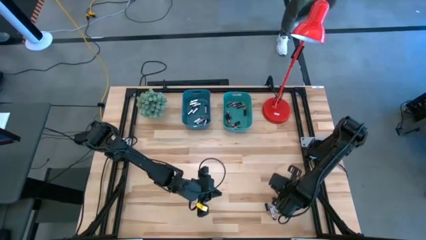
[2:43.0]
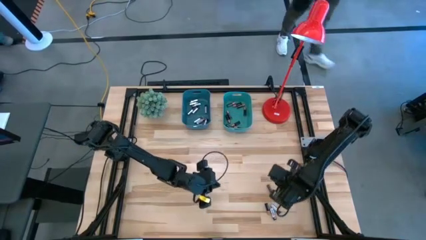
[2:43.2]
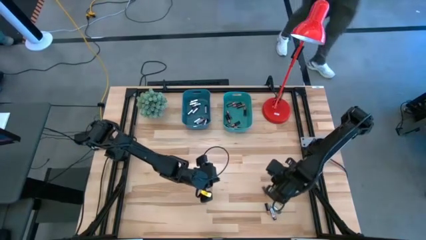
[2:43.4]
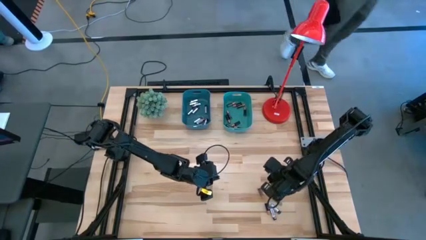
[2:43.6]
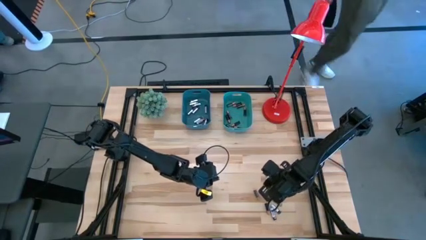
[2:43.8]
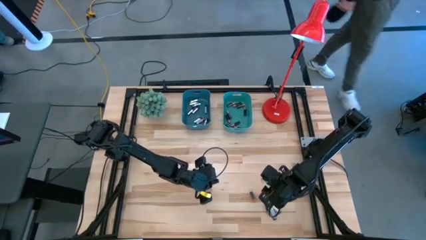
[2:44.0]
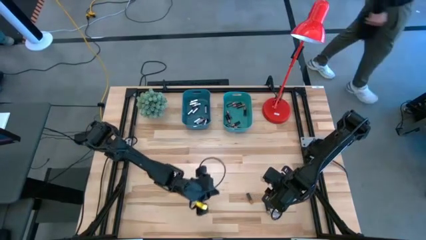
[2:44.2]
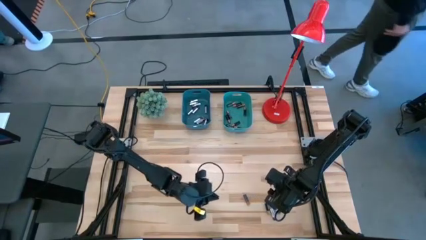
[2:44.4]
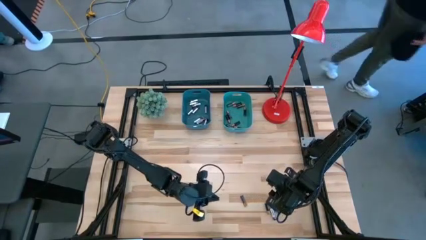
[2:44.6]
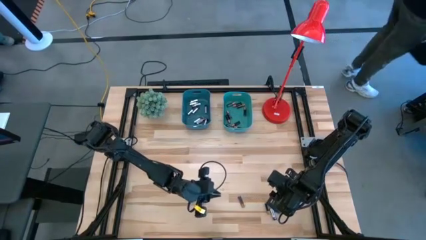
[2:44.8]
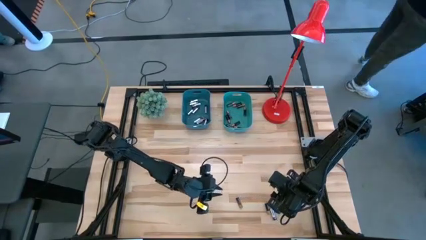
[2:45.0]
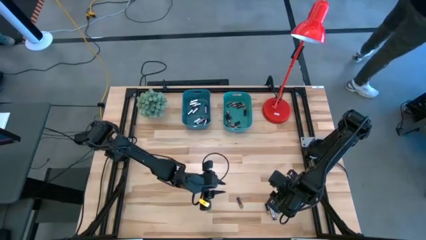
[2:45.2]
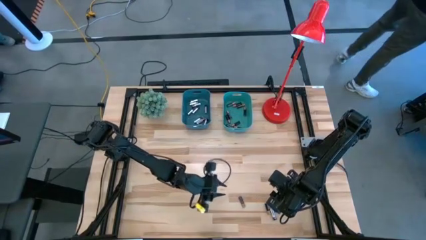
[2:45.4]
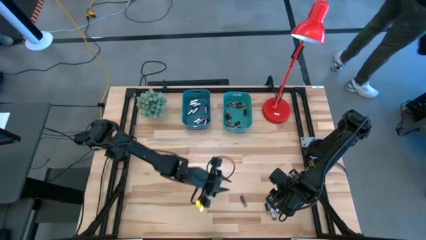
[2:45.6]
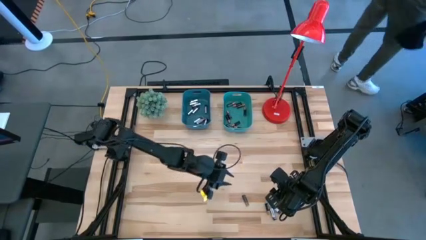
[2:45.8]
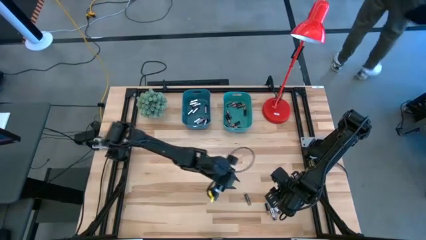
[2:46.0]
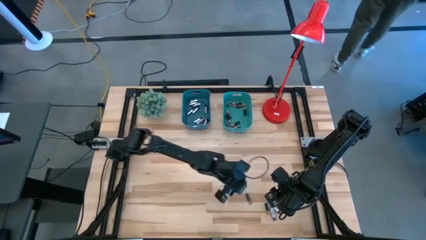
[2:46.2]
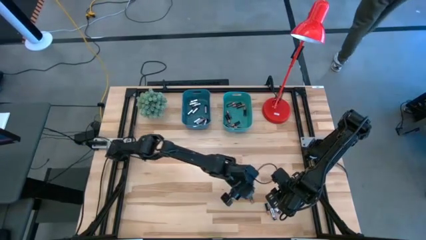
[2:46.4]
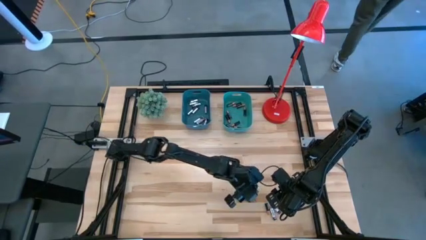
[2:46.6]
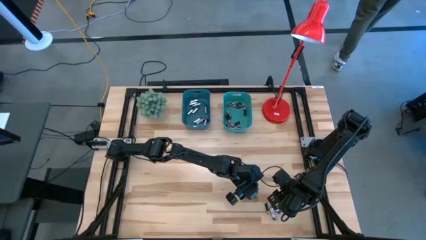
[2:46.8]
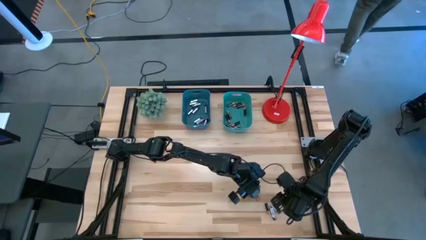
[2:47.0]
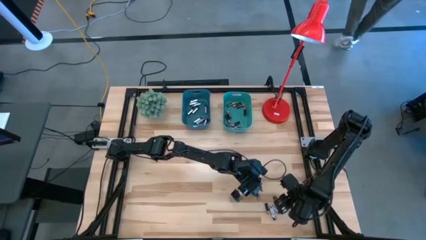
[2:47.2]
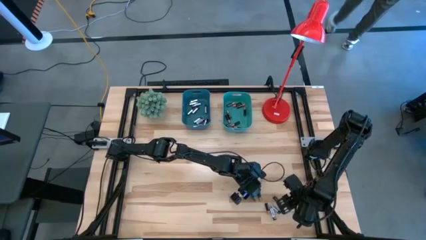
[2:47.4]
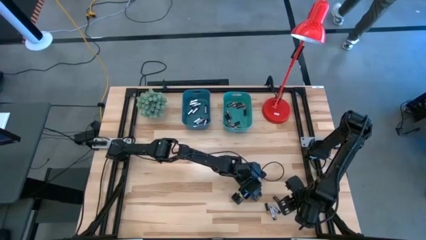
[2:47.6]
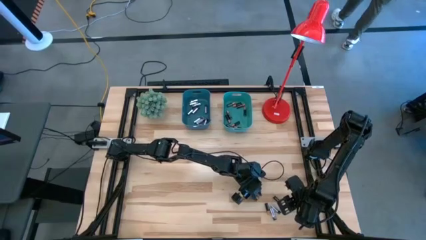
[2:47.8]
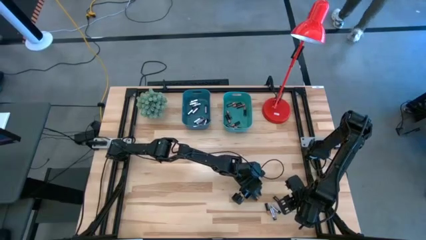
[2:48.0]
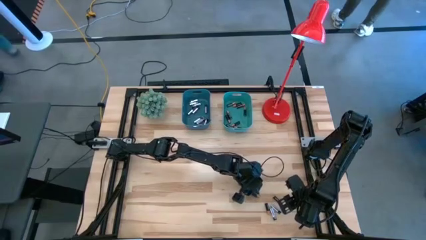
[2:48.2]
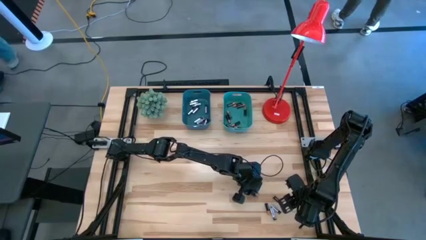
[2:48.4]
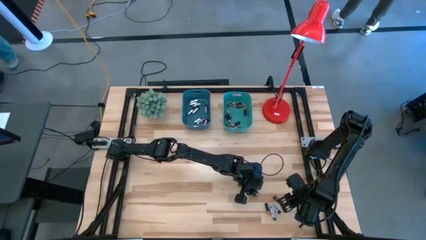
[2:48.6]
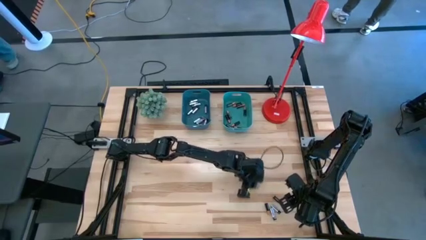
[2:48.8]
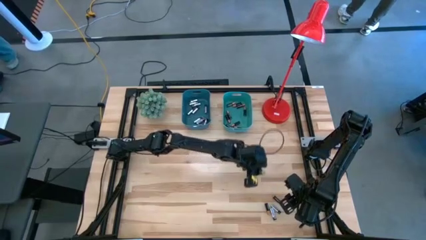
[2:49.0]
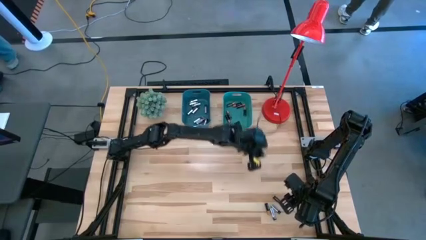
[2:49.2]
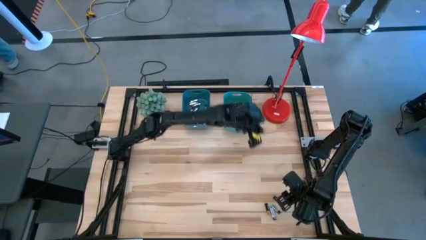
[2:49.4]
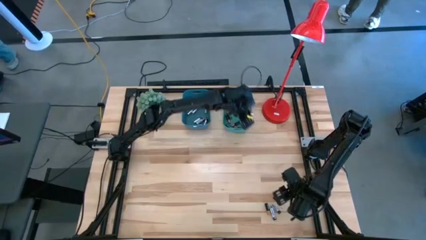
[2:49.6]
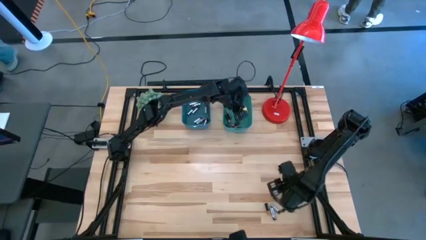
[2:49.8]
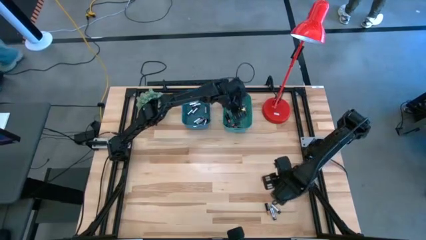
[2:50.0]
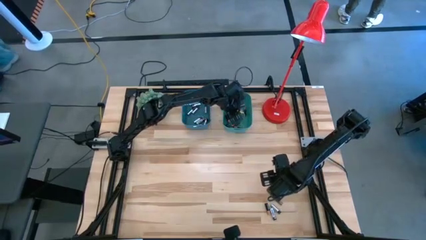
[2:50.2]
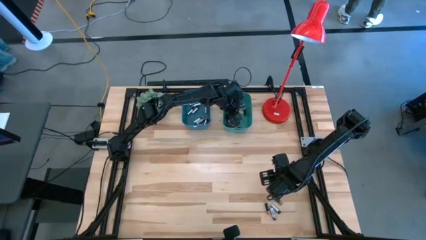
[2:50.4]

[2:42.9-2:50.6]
Task: Sort batteries
Put the black battery into the green bin

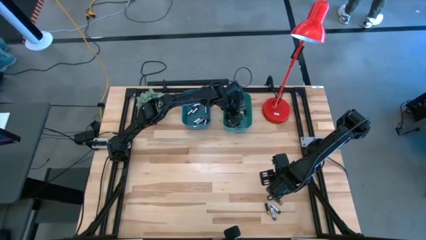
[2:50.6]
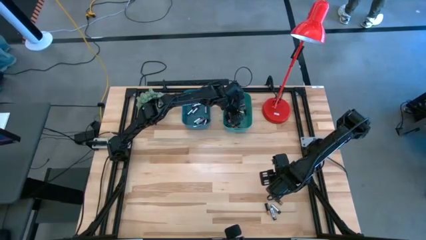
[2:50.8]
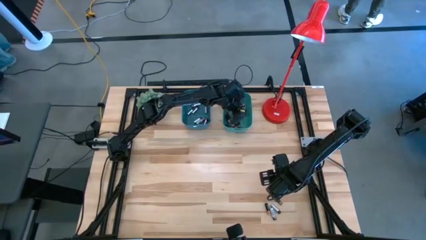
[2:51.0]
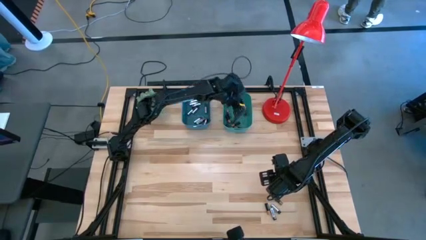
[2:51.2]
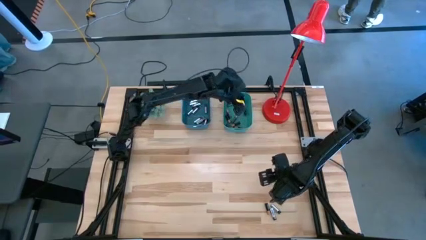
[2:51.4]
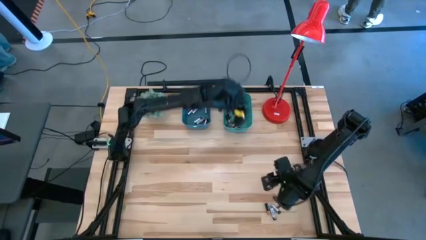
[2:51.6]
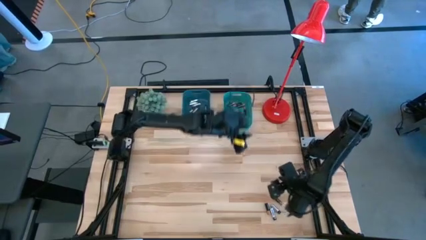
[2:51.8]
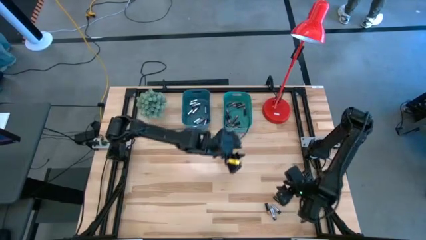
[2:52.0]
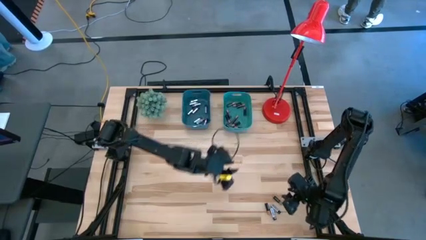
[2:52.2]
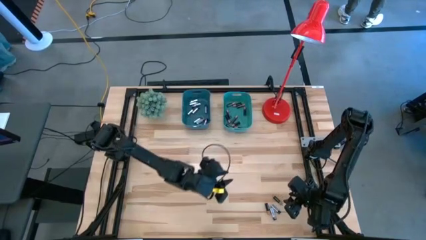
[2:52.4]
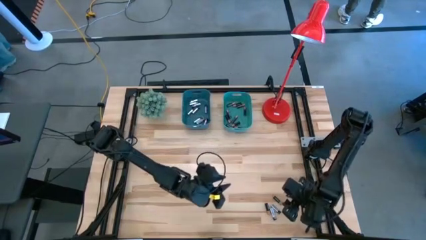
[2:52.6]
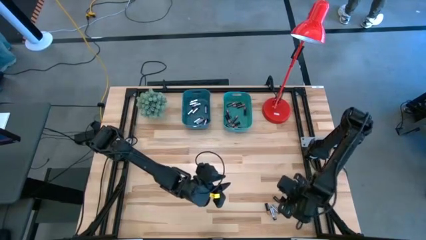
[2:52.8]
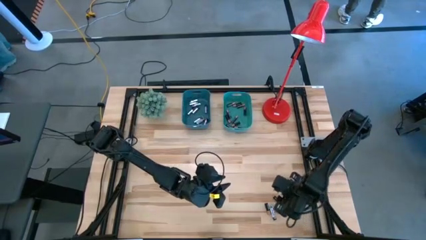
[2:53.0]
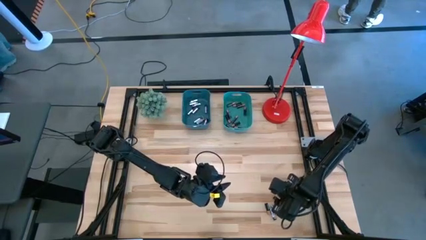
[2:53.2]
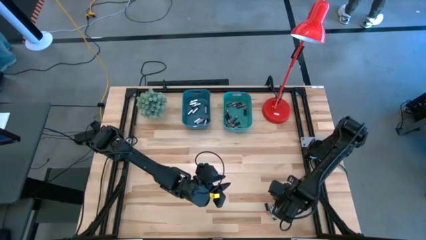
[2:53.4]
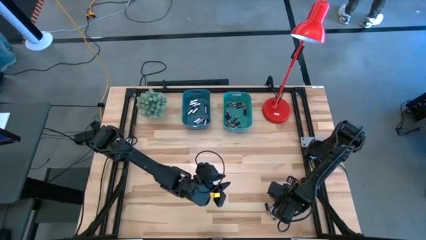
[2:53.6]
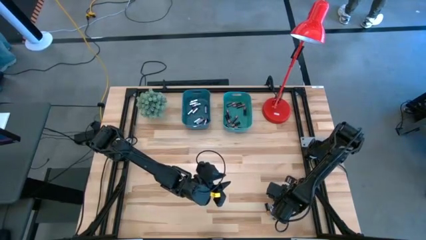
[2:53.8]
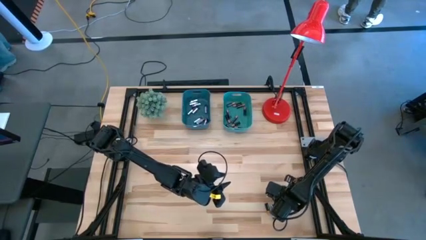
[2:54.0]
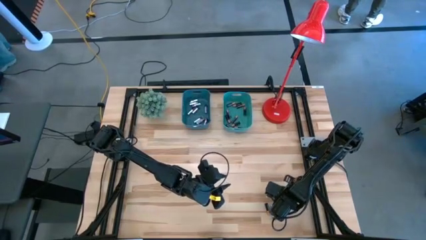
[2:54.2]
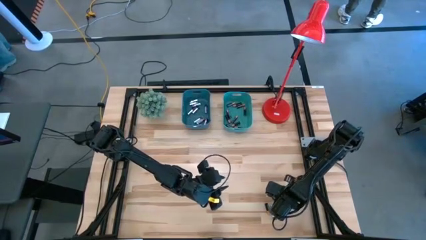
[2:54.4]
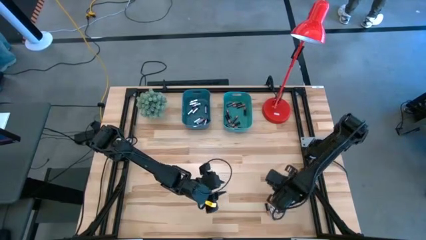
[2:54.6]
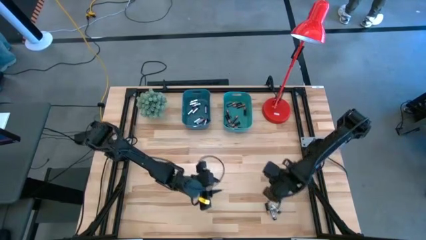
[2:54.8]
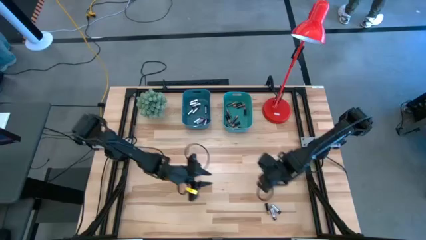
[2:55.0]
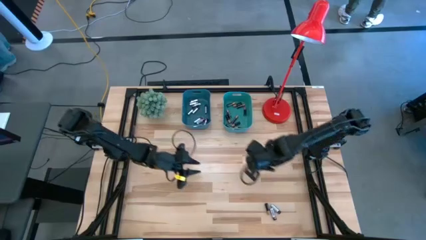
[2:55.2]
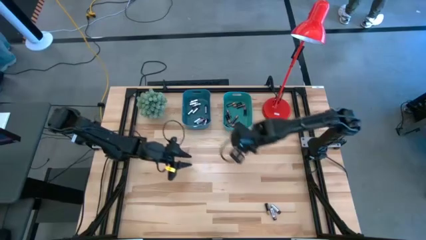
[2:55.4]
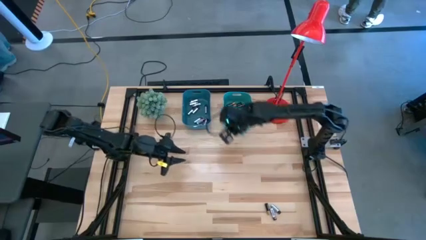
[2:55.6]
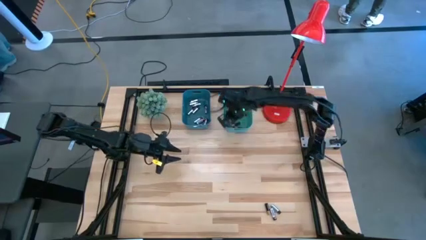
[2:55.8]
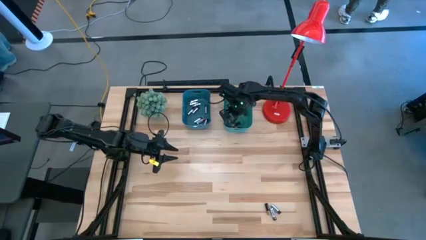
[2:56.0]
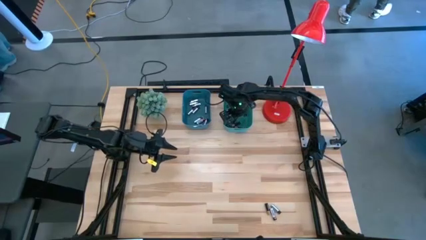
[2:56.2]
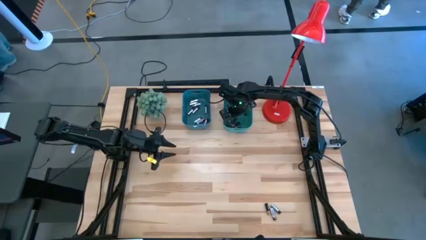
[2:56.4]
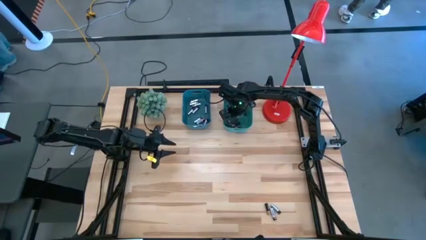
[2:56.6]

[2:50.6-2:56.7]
Put the black battery into the green bin
